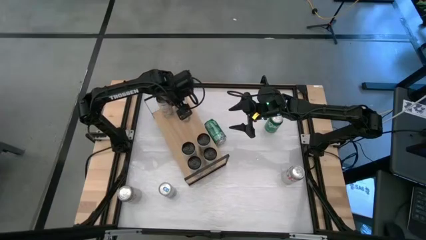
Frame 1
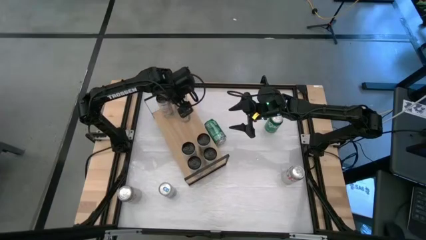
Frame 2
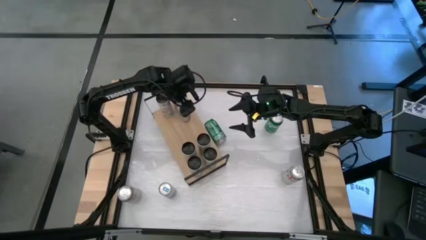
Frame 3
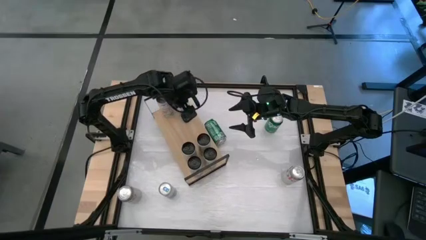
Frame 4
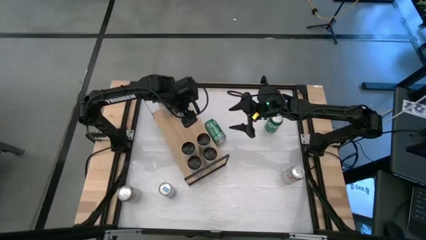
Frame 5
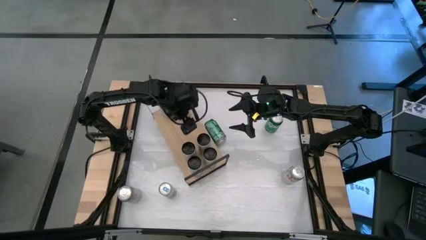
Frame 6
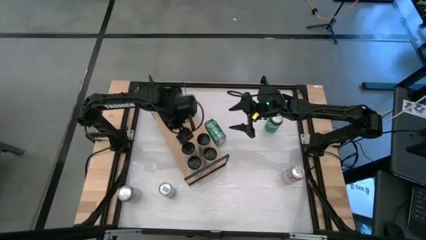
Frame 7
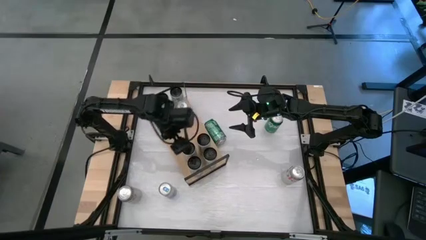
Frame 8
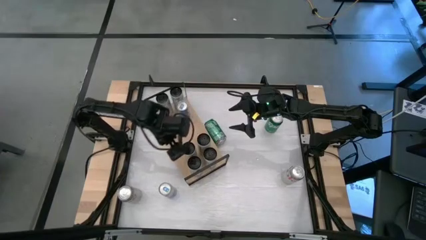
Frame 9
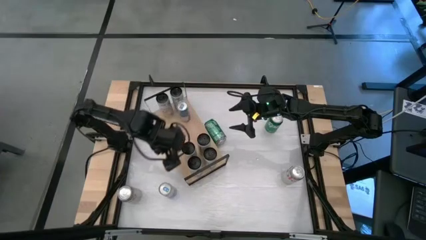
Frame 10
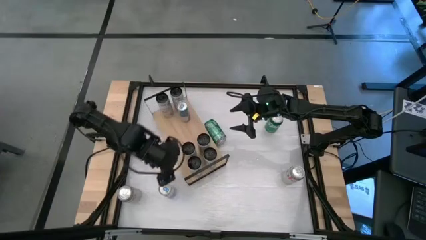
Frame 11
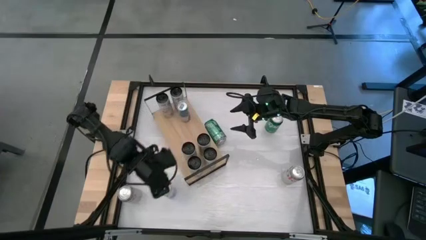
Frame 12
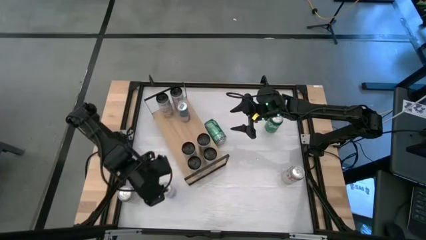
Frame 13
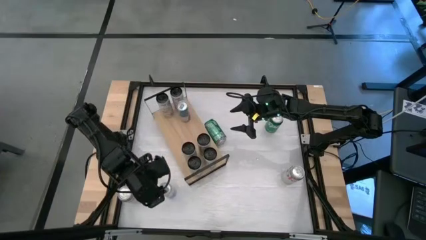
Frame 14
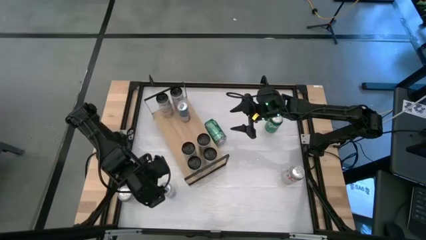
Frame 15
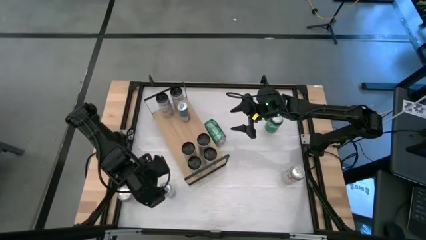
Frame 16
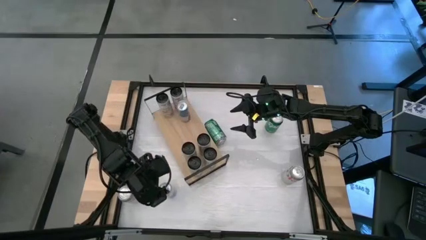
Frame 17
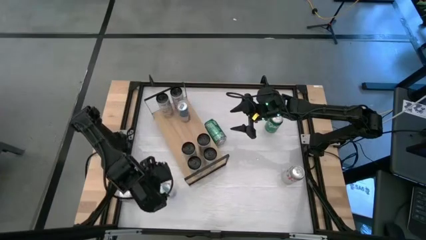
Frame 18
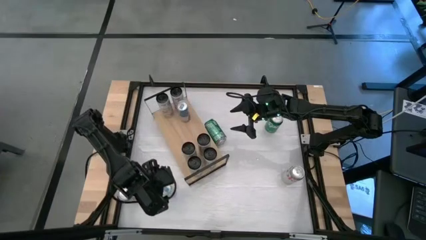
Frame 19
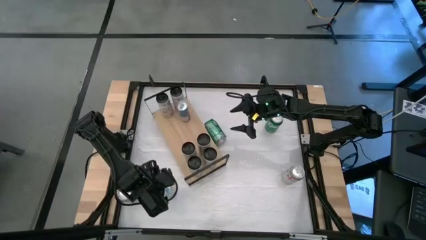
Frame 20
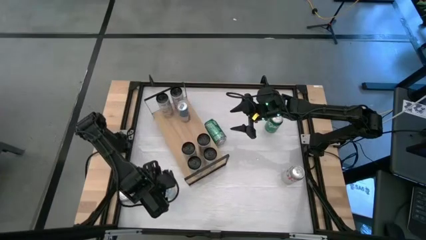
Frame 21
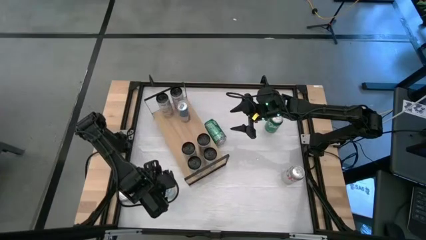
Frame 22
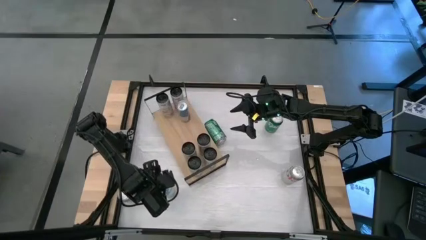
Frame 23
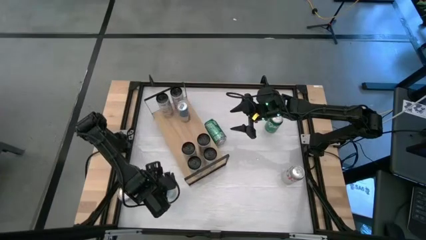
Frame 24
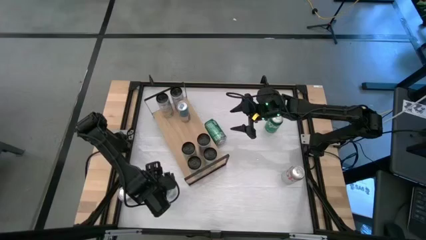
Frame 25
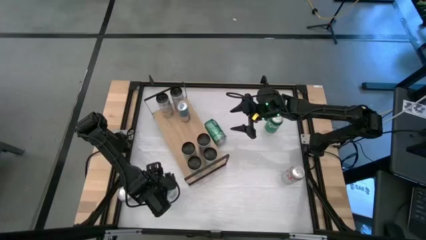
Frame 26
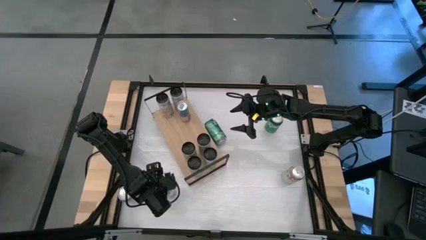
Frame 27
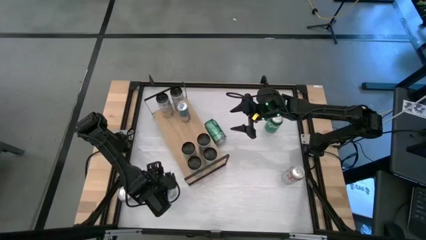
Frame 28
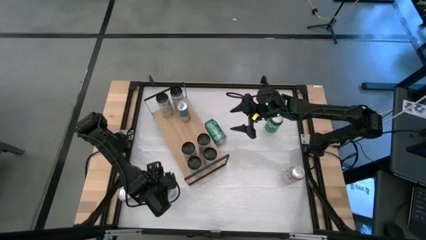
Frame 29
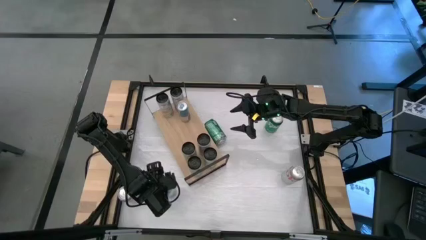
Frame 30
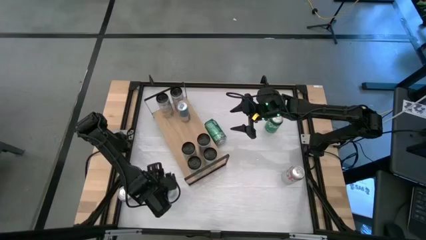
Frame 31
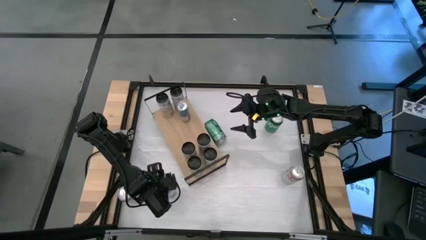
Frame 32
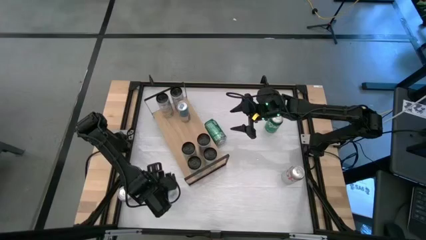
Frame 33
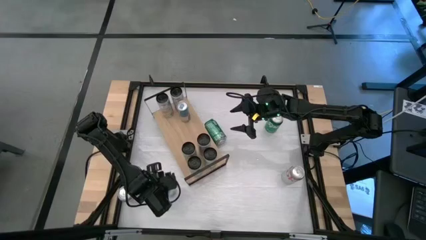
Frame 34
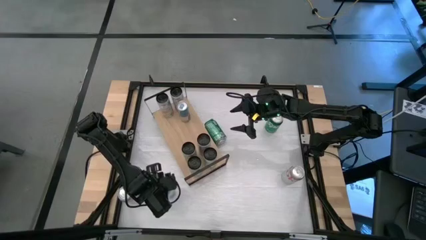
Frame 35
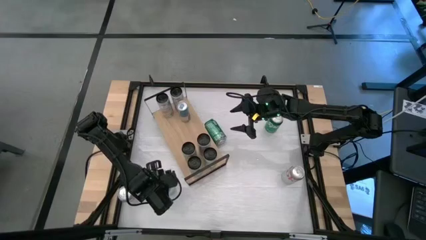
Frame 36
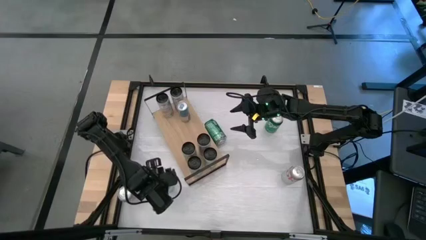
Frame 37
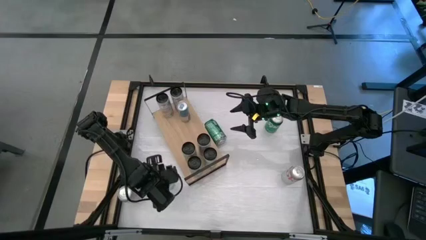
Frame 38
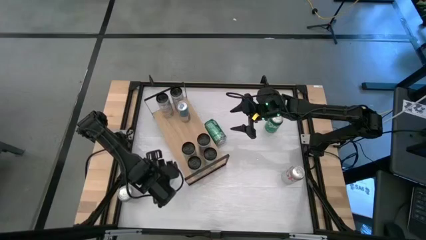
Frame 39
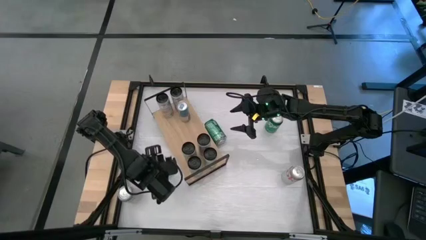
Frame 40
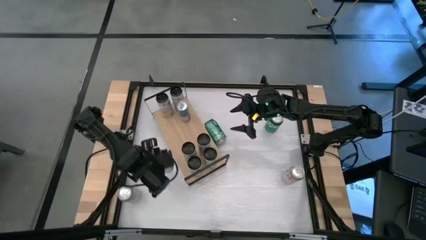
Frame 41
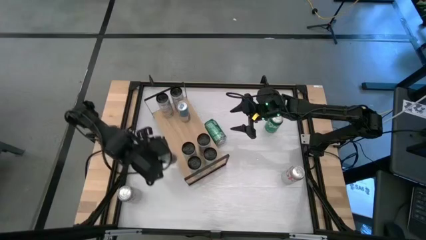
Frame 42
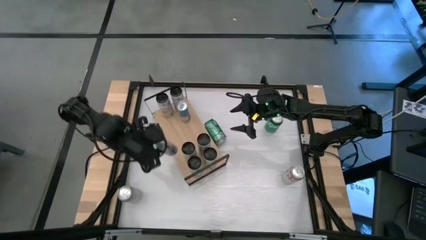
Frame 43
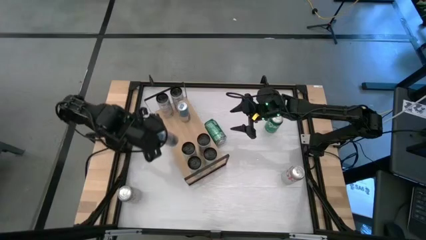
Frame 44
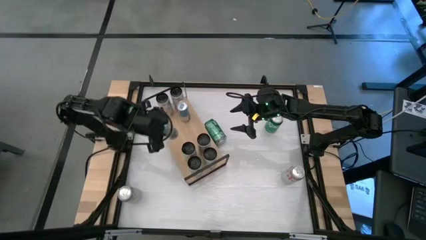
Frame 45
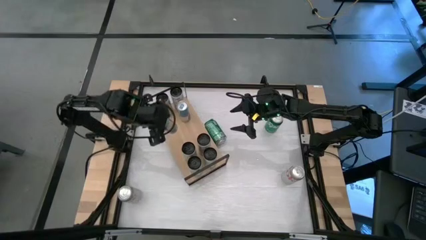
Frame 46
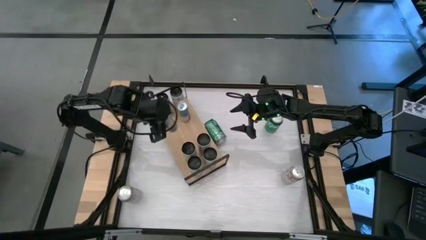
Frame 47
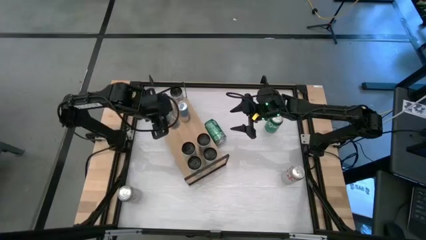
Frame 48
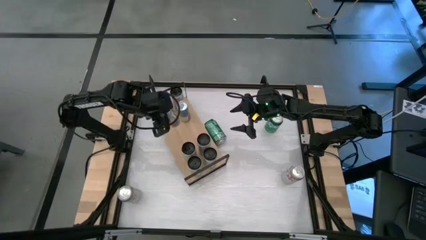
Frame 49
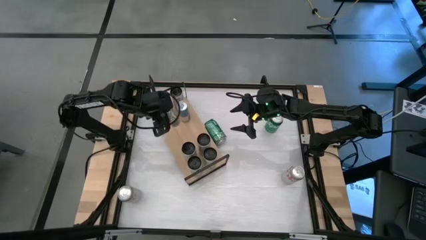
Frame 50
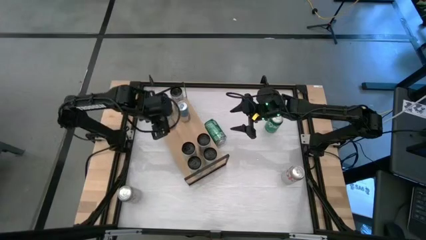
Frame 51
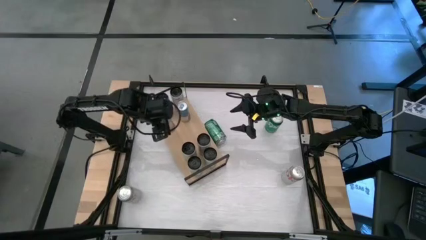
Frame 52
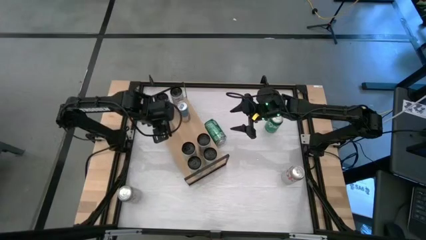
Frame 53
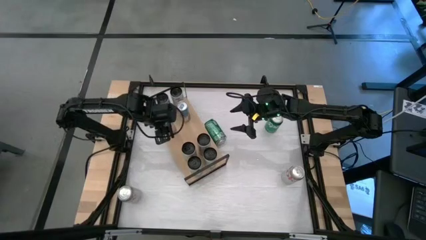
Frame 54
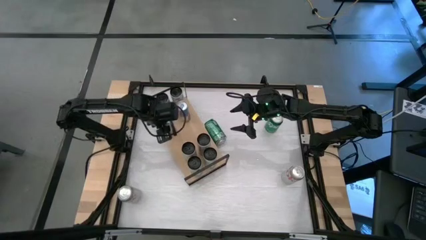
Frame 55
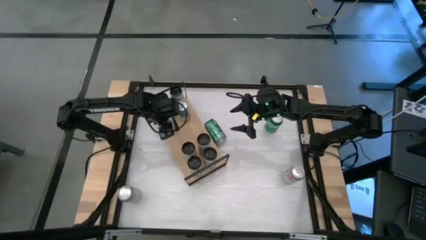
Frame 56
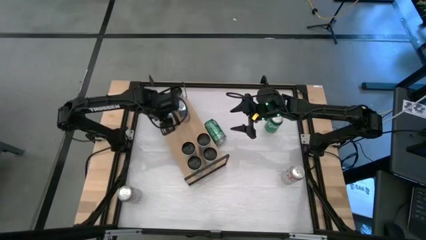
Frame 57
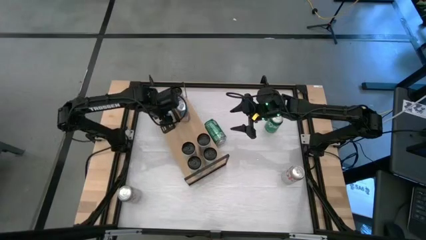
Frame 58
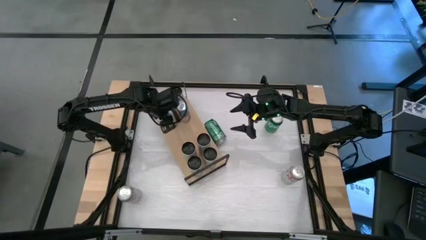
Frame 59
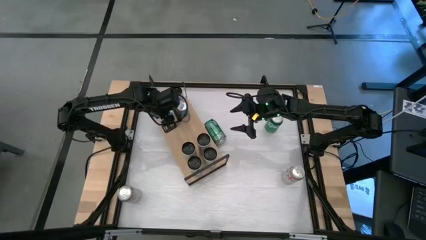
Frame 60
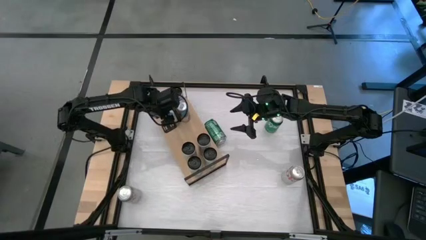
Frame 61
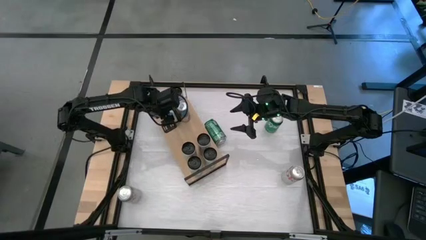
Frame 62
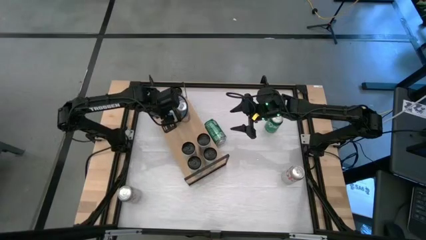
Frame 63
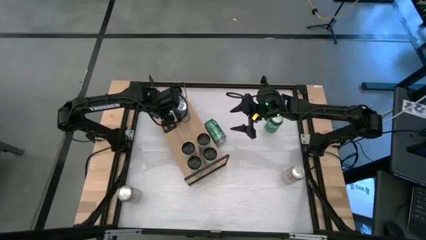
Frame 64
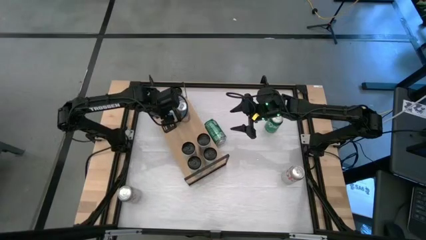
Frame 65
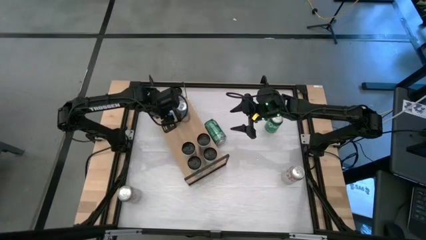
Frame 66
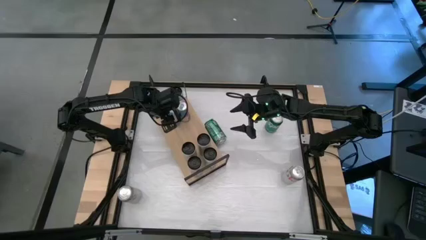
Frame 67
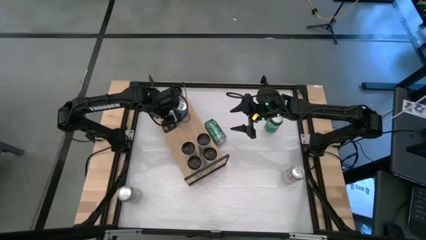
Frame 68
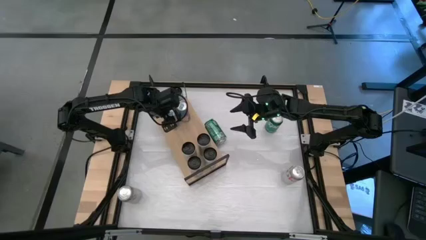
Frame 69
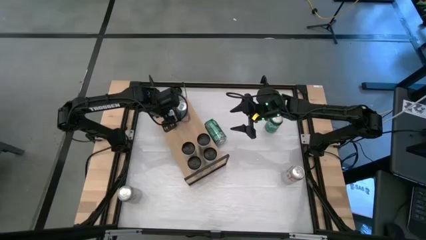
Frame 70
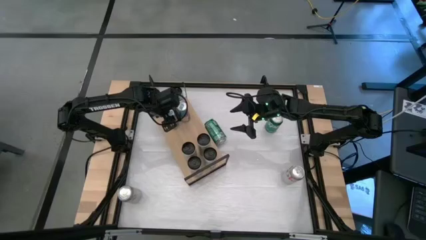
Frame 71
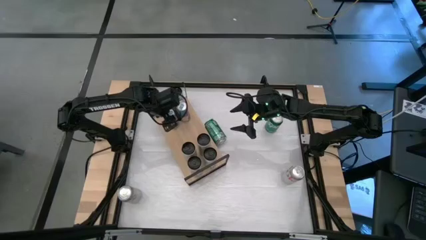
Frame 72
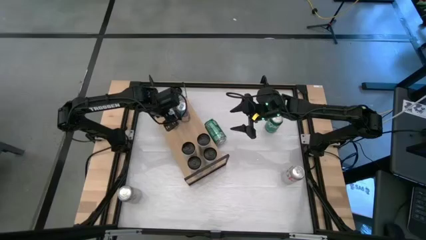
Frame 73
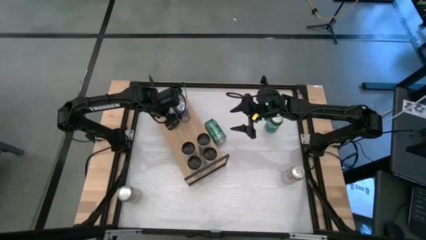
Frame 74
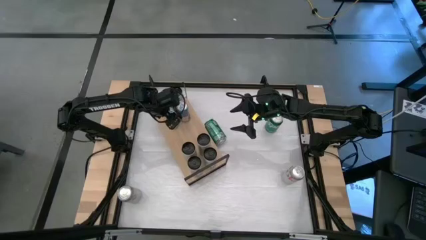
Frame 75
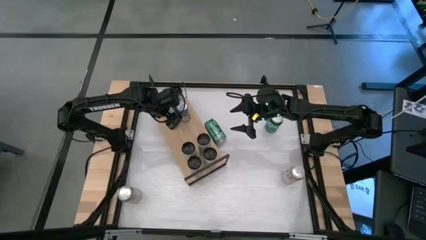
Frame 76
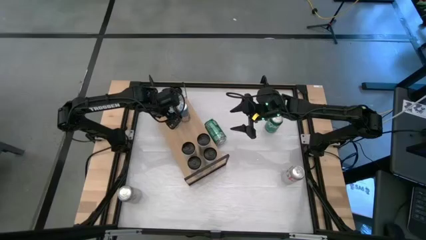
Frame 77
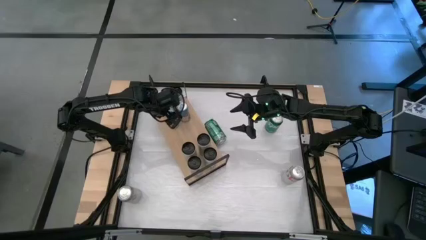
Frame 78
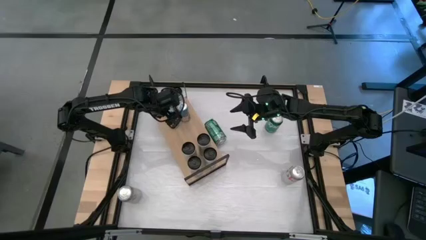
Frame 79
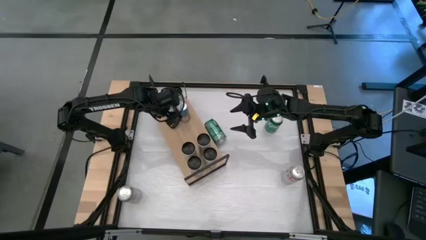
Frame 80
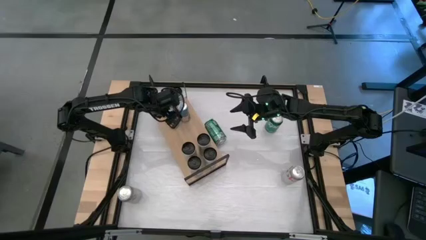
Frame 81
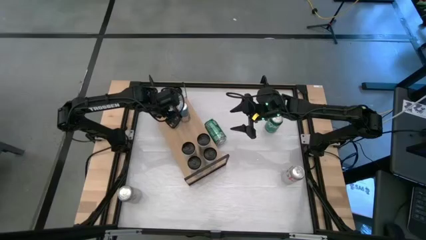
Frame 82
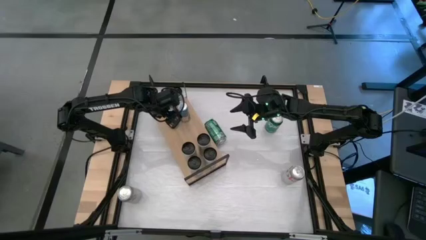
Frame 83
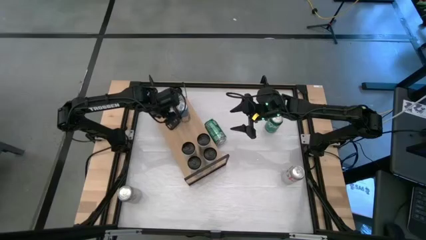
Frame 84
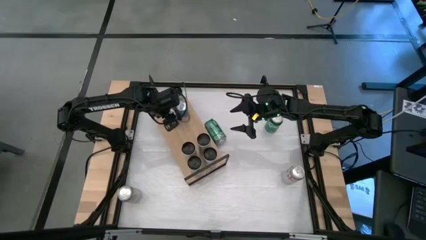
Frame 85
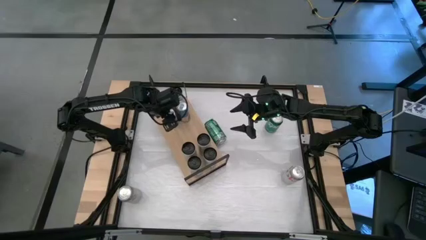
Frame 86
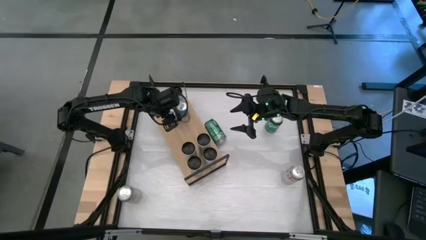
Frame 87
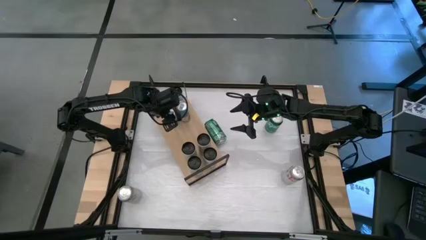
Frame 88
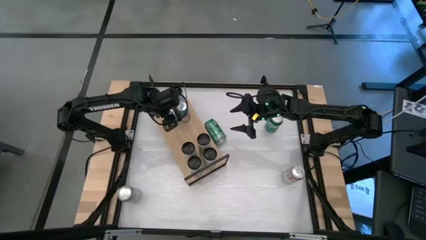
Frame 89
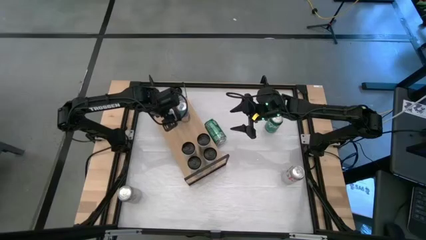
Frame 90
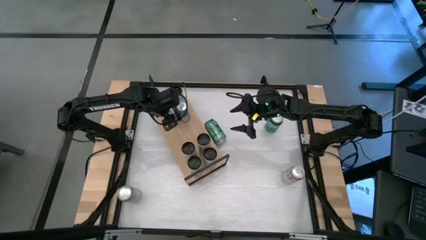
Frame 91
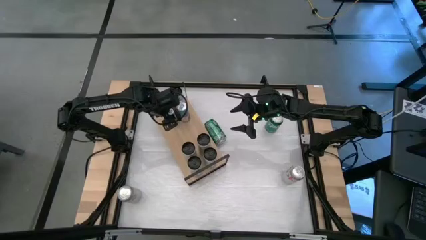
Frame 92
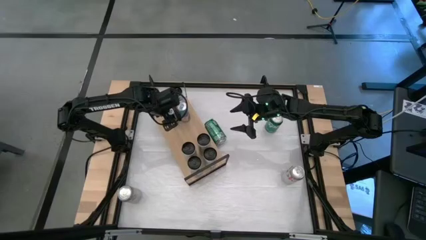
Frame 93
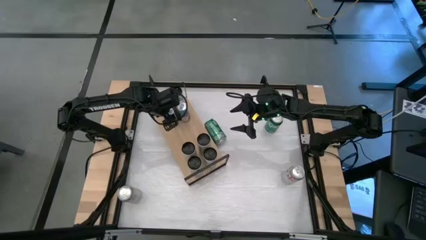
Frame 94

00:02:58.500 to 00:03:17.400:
Task: Place canned beverage on shelf
Put the white blue soda can on the shelf aligned with the other white blue soda can
